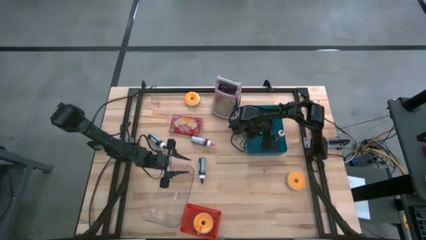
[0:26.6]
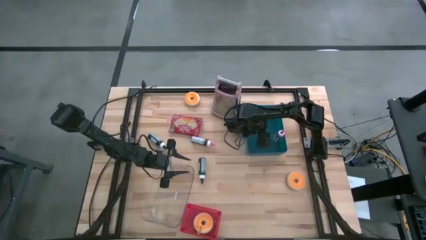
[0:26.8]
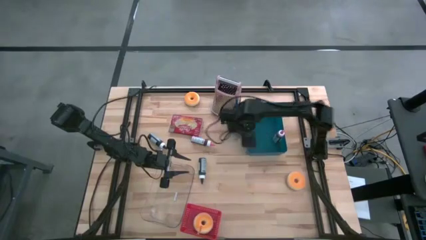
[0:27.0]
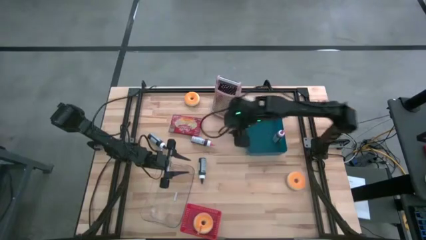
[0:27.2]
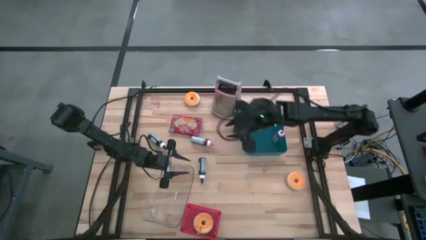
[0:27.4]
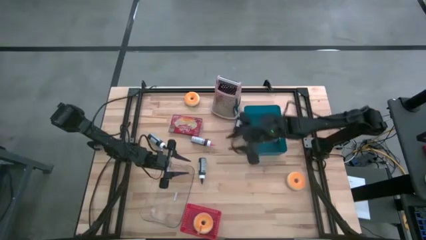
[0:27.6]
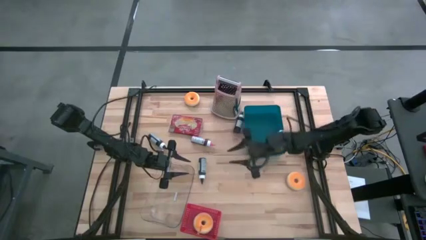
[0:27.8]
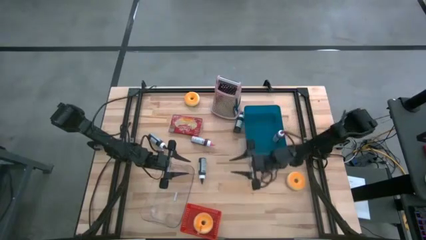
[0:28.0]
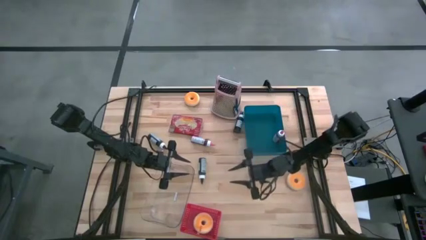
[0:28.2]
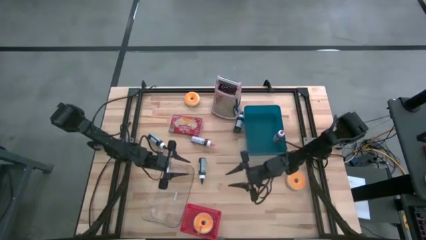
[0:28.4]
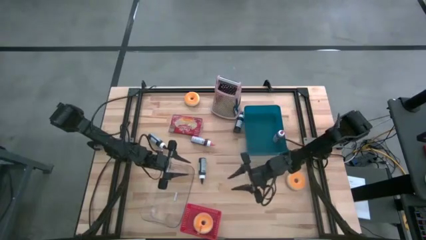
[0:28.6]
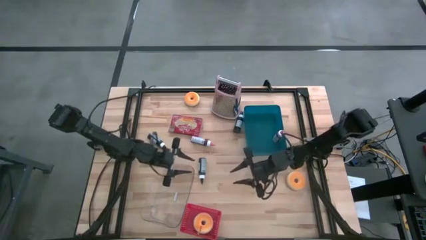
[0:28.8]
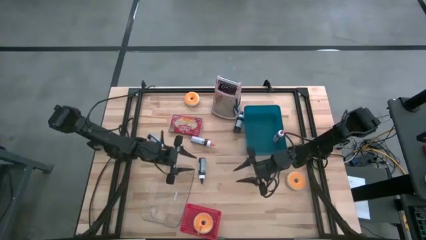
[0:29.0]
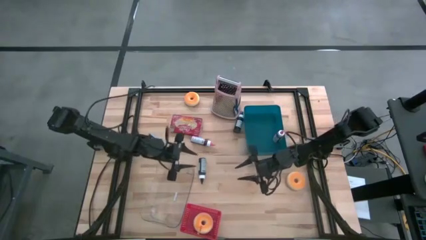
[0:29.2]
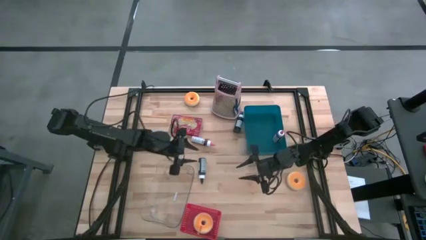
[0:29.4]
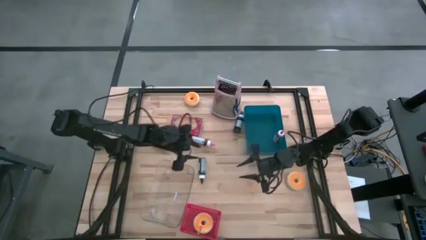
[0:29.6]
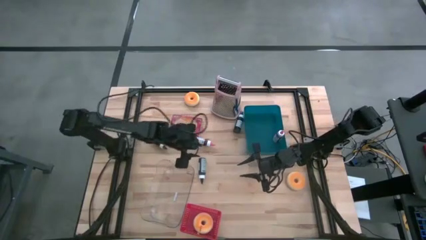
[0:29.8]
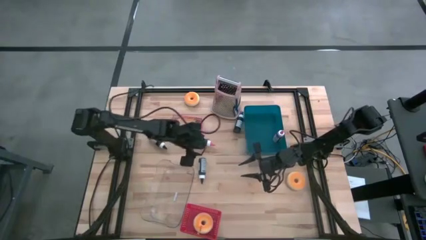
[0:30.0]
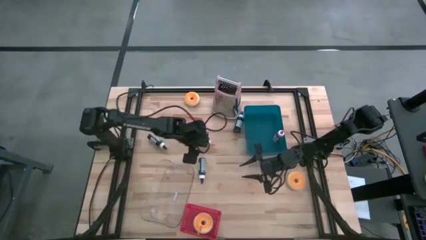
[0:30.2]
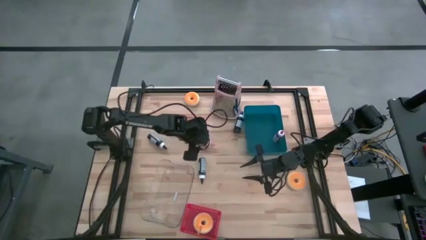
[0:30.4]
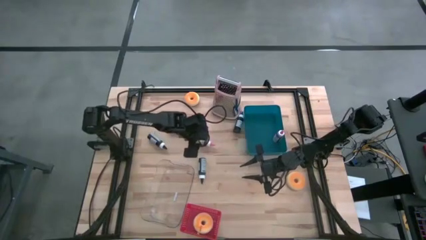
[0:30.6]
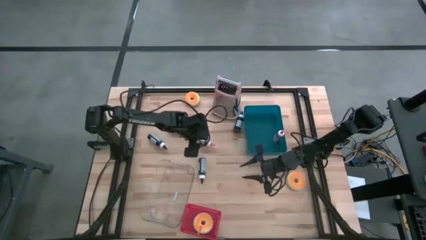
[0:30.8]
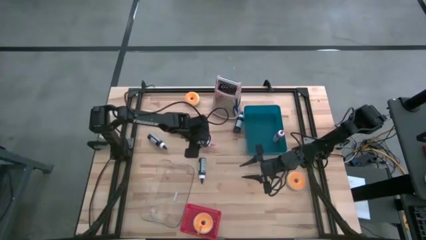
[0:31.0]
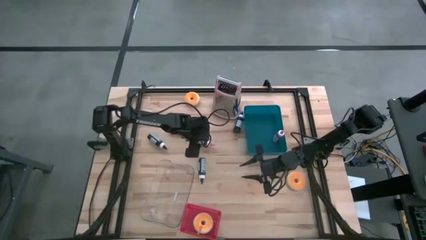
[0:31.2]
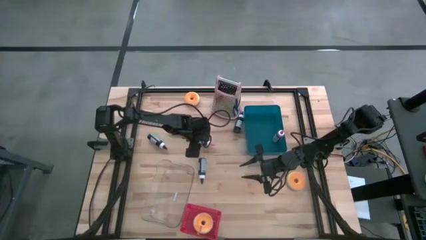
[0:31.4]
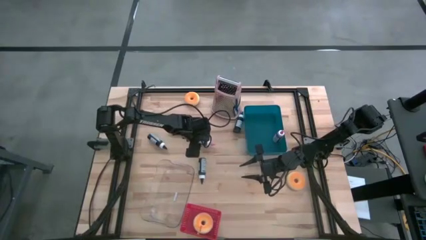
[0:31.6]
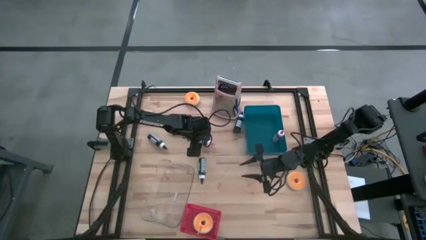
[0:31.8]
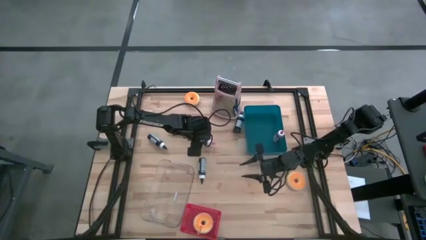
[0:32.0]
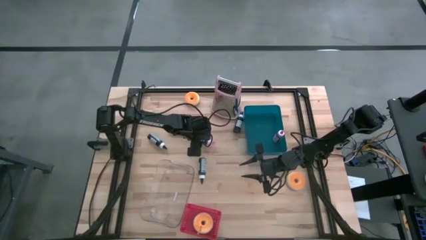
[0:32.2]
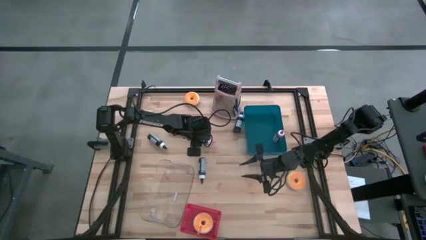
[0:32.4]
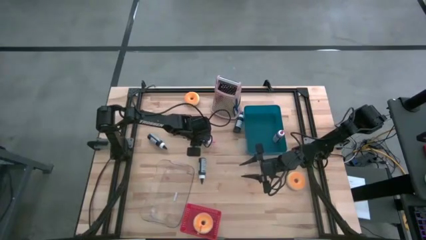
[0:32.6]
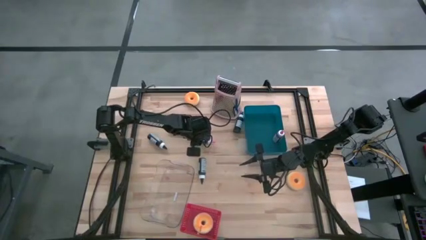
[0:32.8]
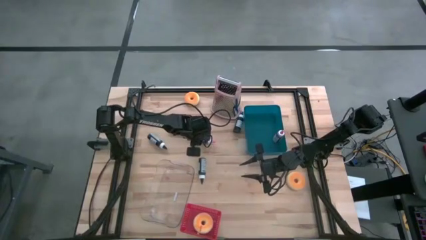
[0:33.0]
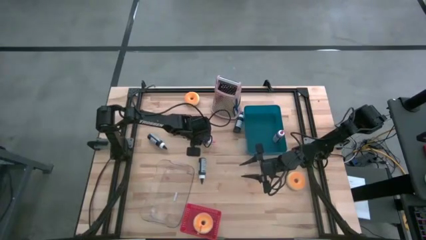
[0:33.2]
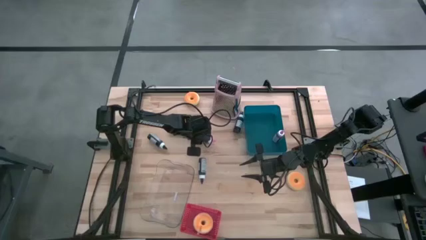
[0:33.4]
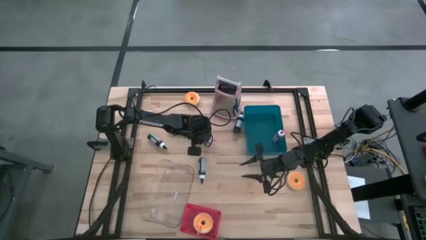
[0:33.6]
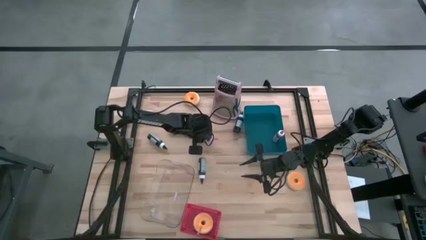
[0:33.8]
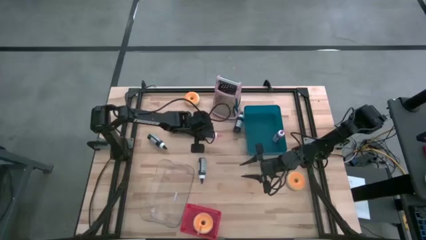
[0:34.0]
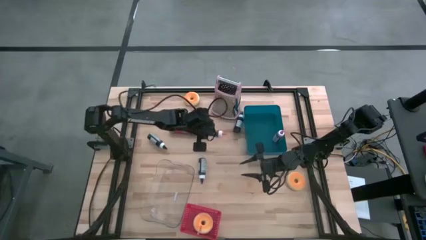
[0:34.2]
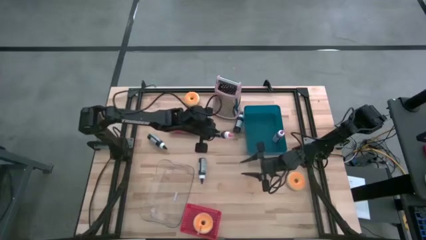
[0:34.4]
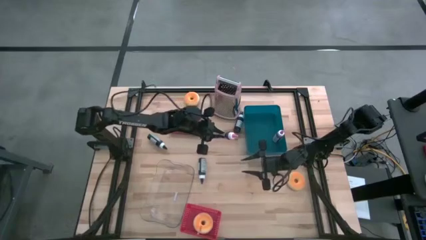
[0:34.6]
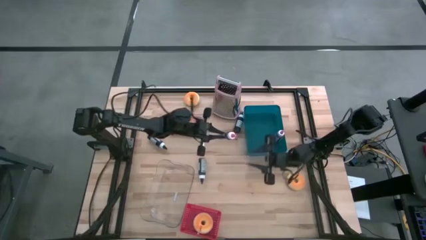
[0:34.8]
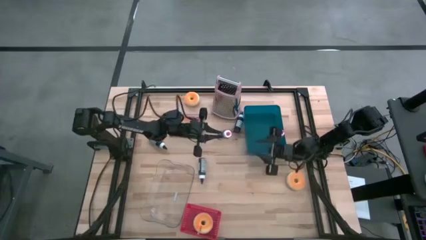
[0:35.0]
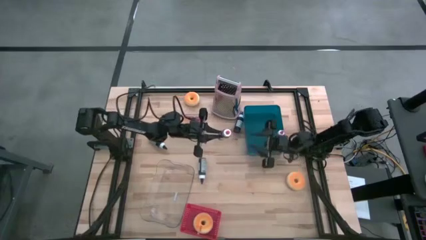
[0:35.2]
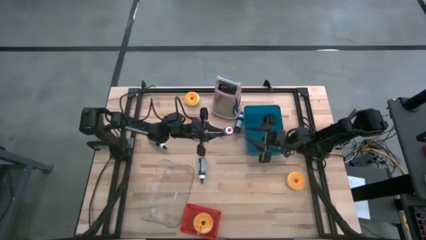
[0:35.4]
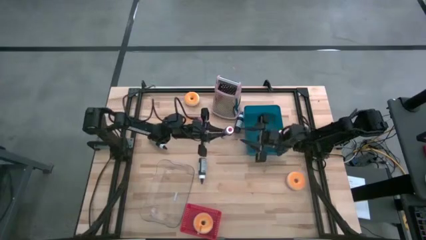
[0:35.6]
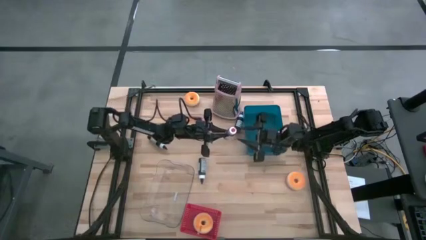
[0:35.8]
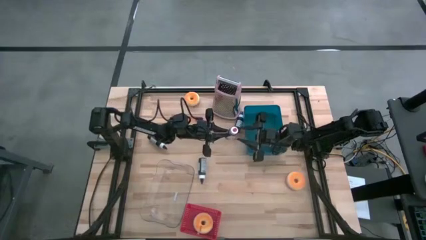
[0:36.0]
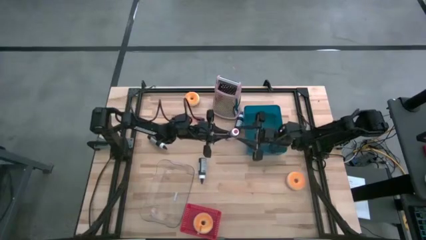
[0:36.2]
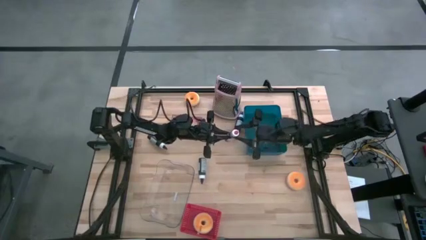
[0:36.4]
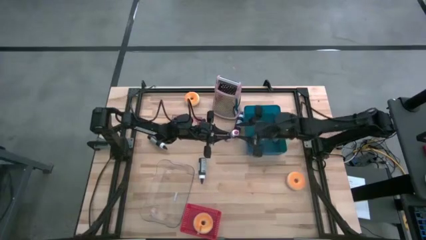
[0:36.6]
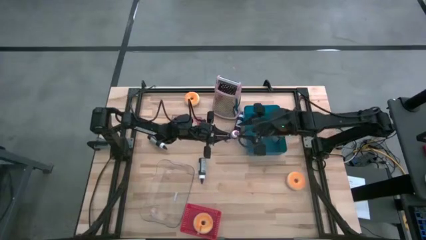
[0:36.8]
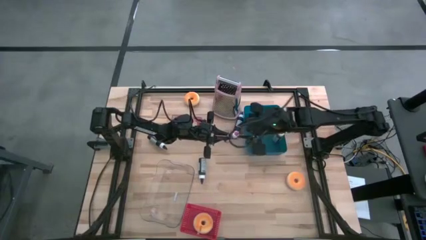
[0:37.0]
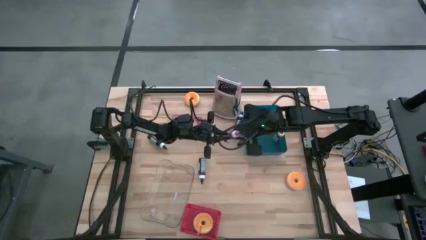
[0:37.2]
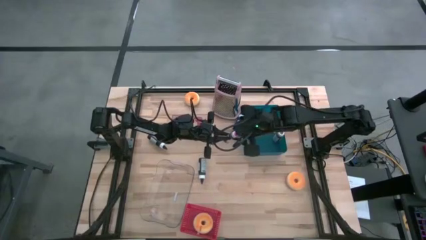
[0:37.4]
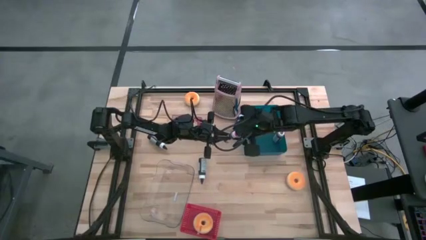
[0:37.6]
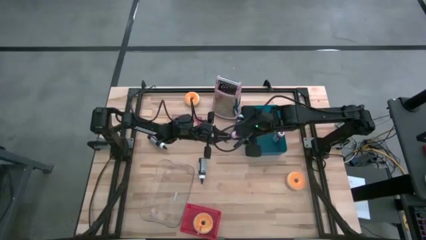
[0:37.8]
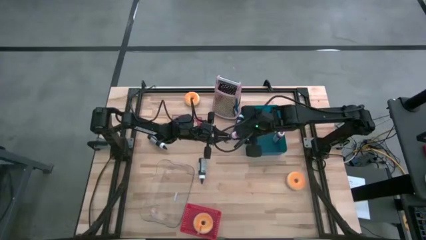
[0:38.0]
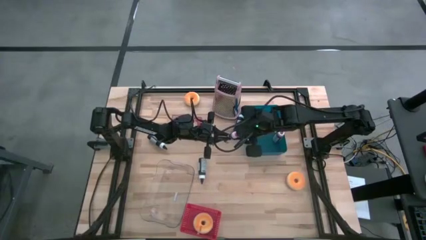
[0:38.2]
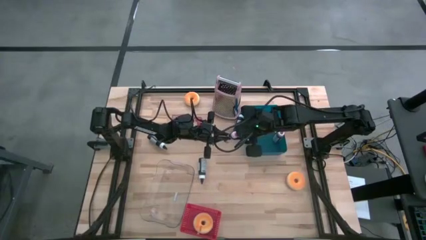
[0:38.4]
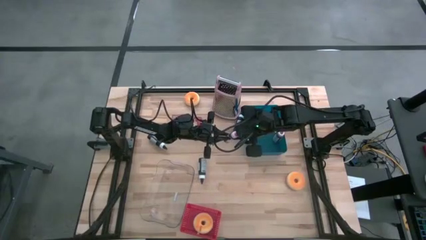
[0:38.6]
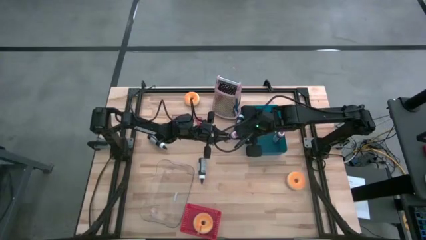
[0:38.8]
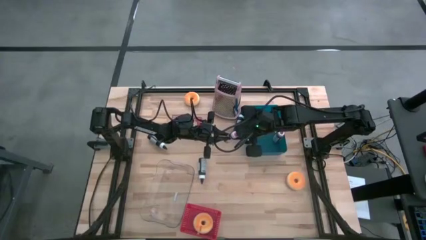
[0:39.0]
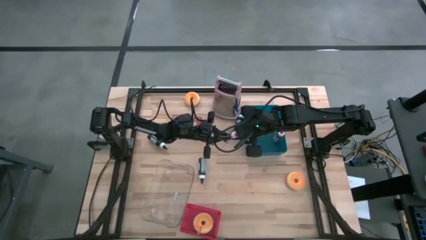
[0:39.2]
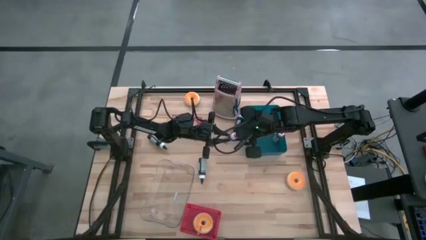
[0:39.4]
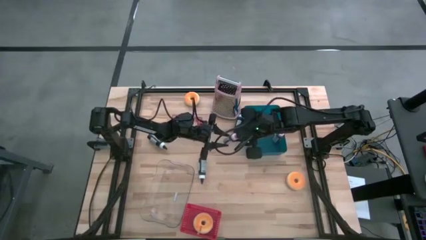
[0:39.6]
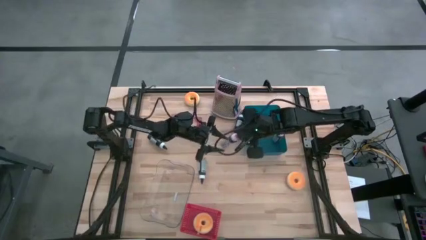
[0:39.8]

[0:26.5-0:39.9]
Task: Pick & Place Food Item
Put the pink food coloring bottle into the blue bin
